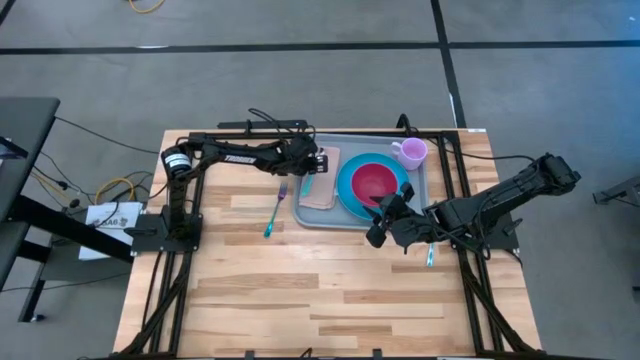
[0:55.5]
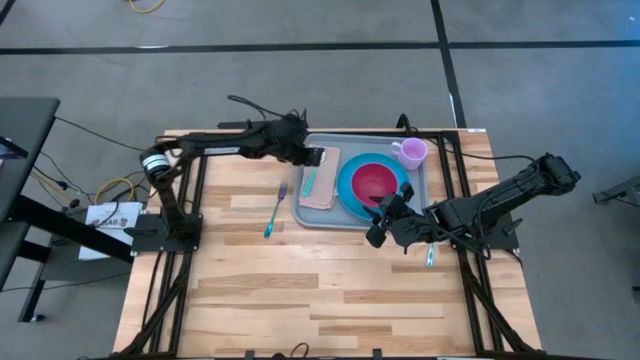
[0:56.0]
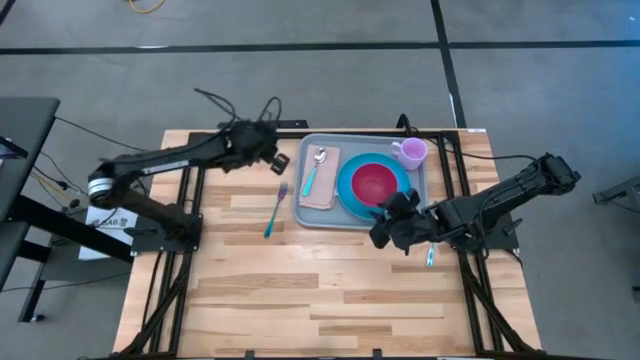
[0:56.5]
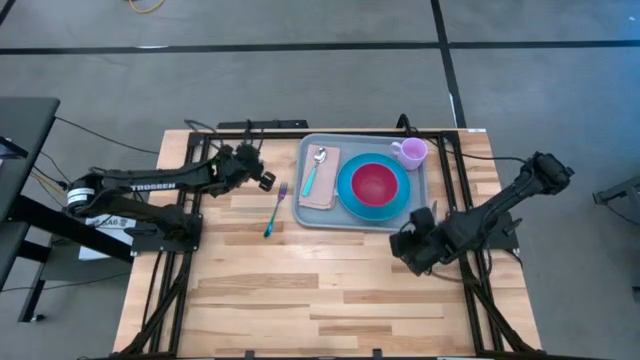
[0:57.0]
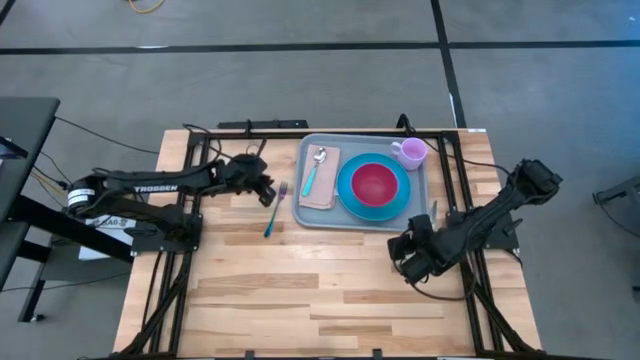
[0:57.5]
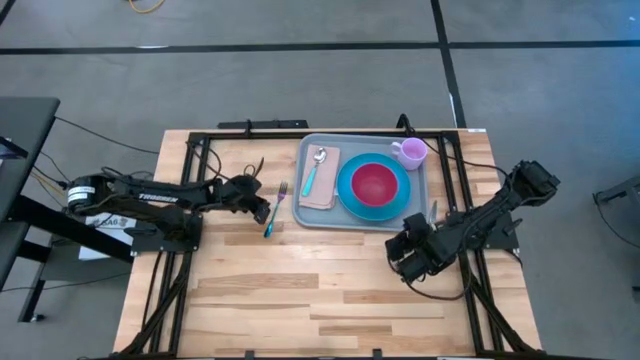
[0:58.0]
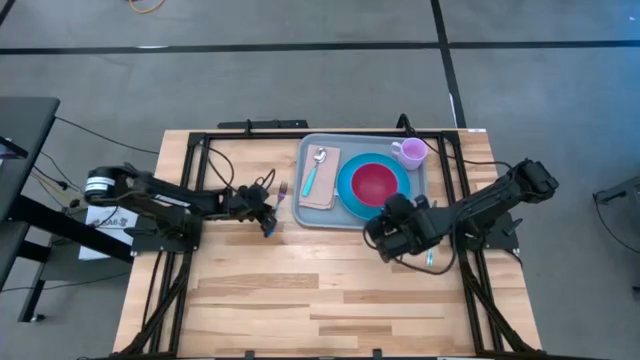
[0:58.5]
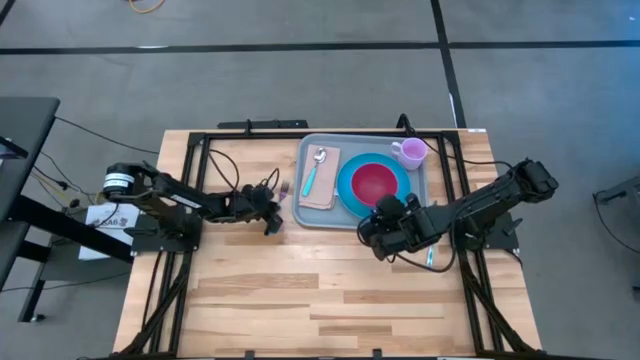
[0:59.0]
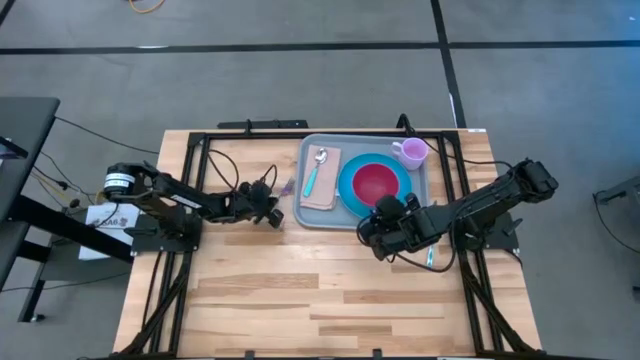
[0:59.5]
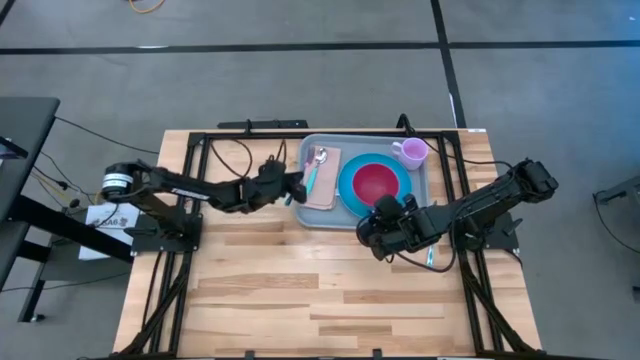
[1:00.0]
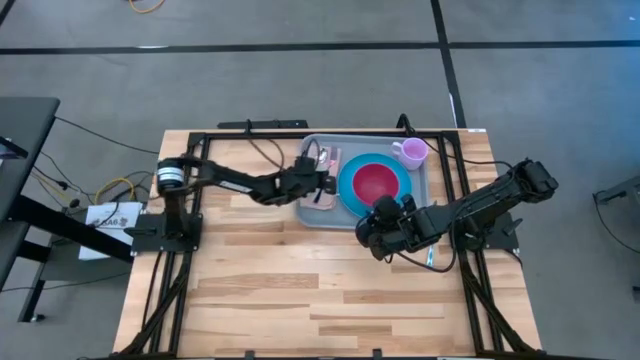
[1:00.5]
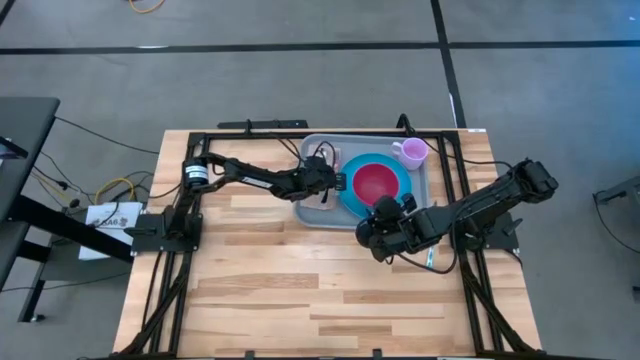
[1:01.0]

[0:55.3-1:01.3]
Task: Set up tray
Put the blue fork on the brown napkin to the right of the light blue spoon

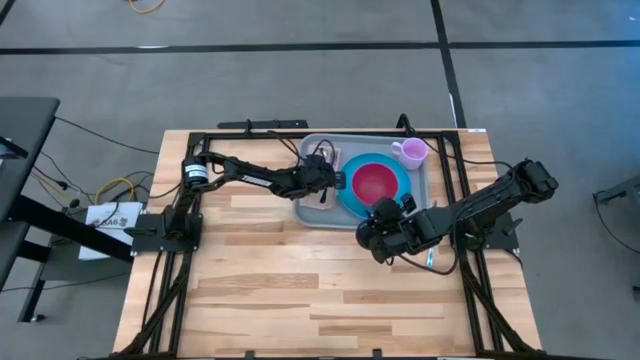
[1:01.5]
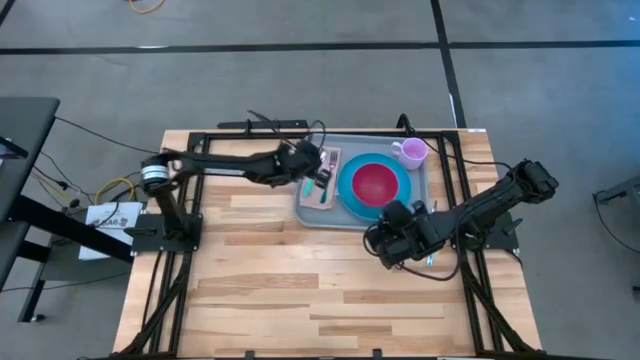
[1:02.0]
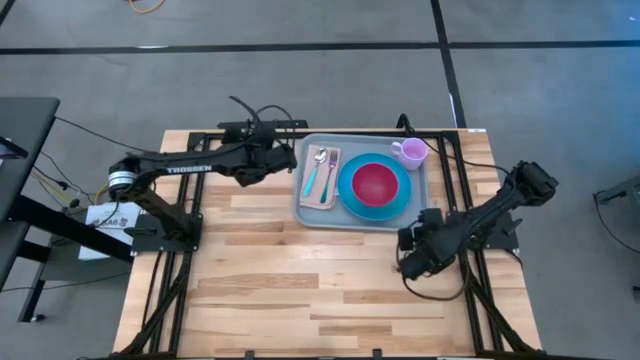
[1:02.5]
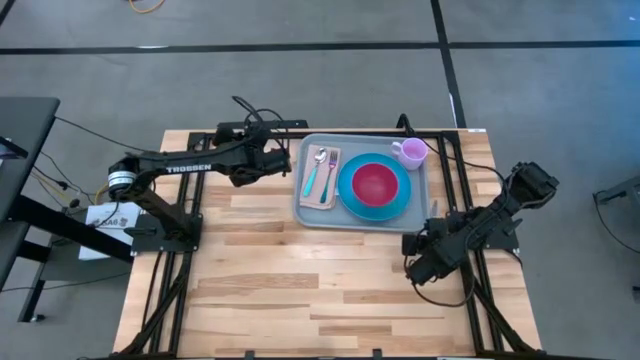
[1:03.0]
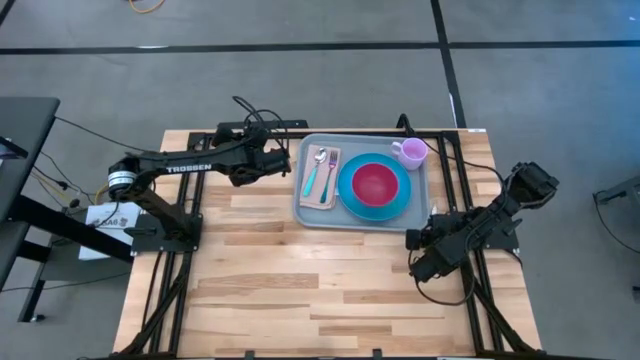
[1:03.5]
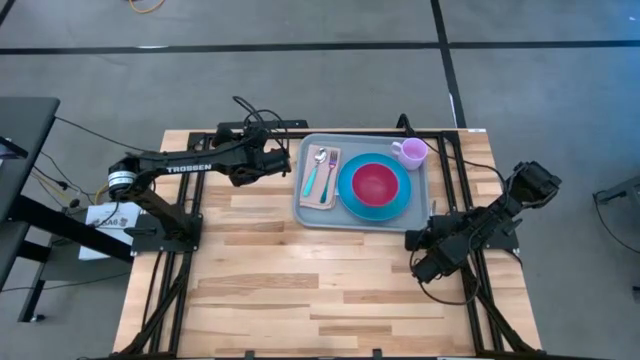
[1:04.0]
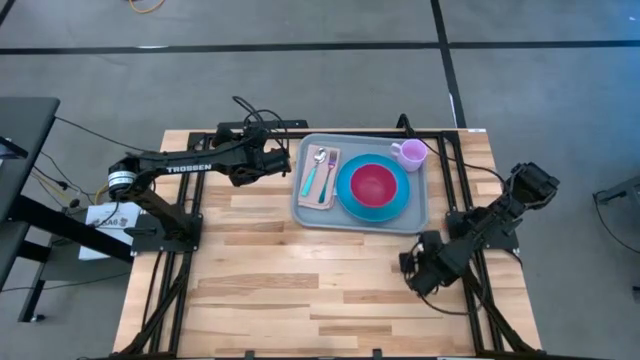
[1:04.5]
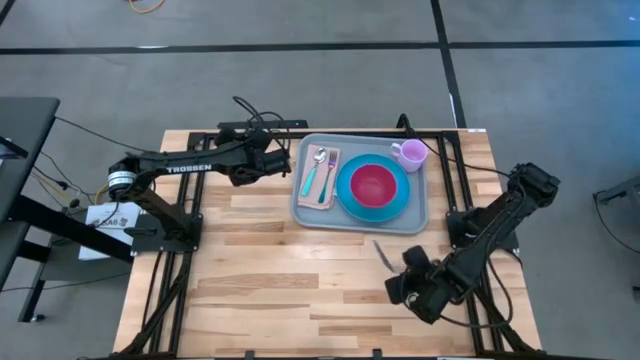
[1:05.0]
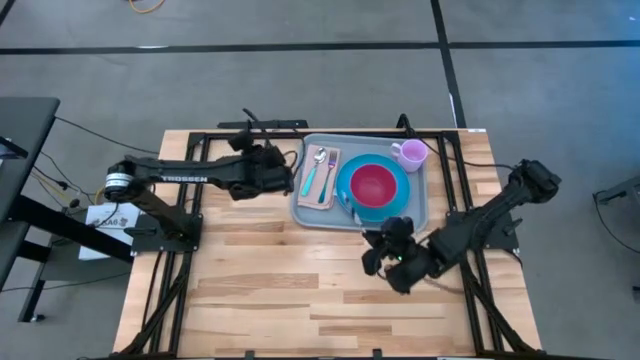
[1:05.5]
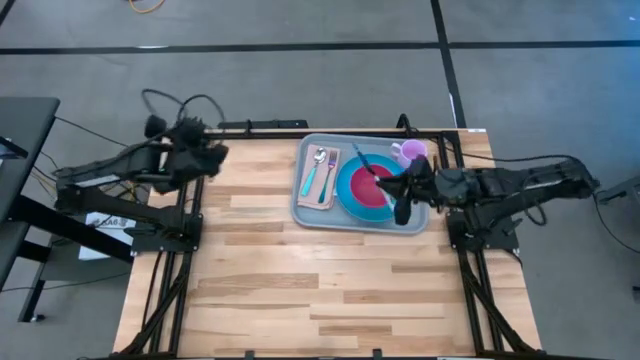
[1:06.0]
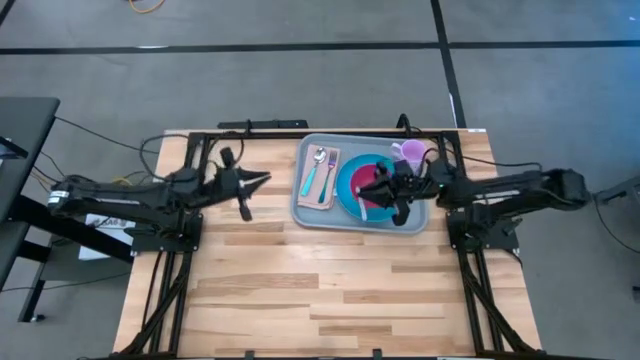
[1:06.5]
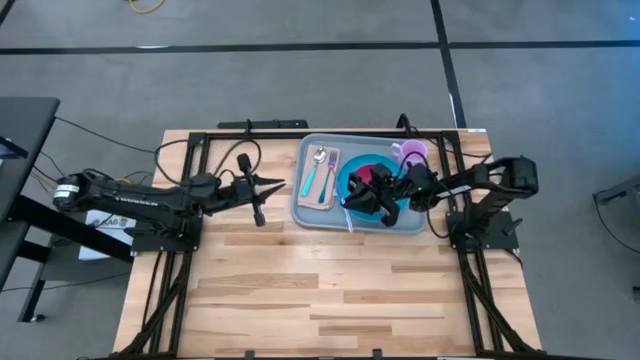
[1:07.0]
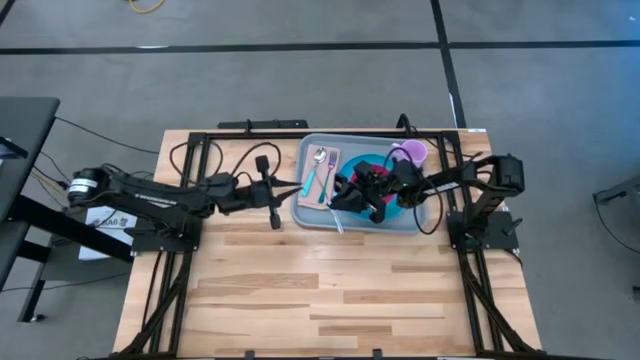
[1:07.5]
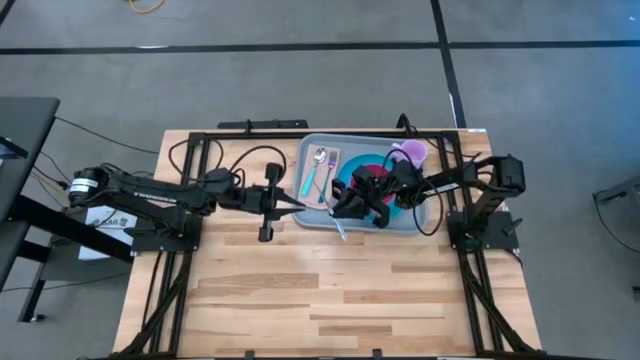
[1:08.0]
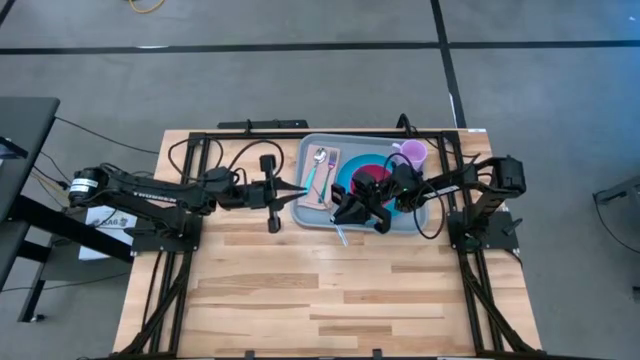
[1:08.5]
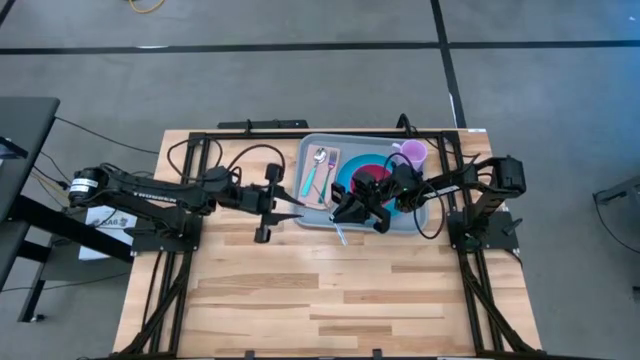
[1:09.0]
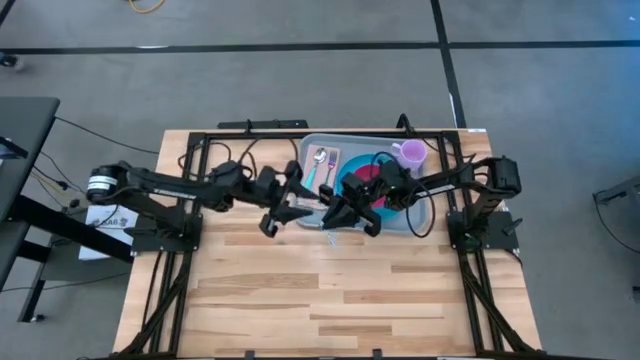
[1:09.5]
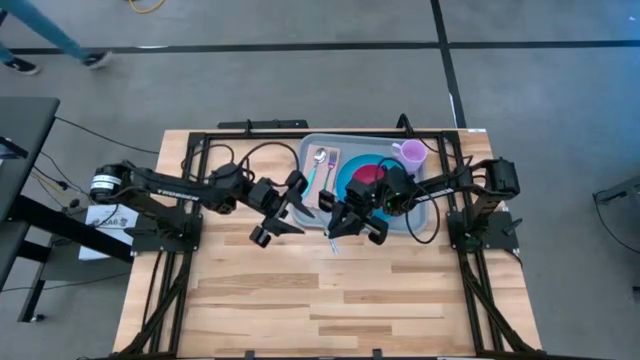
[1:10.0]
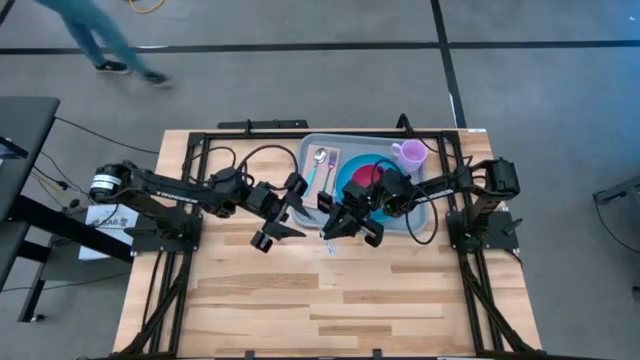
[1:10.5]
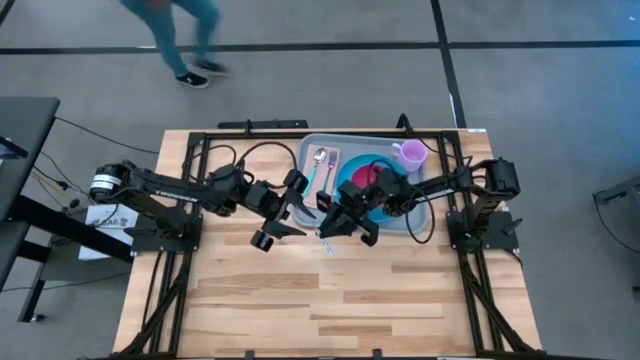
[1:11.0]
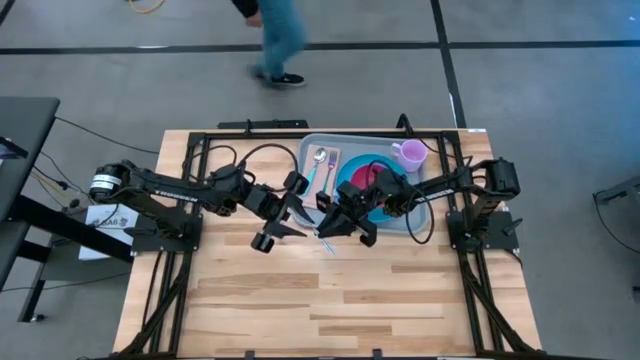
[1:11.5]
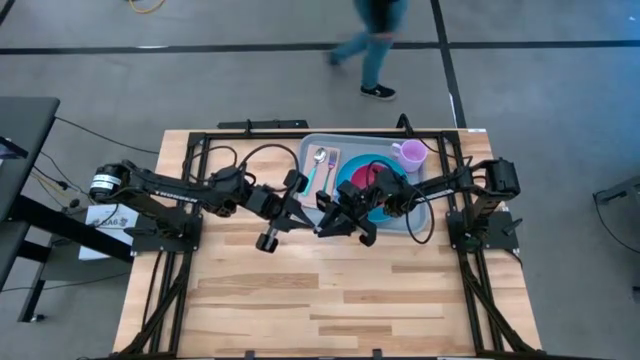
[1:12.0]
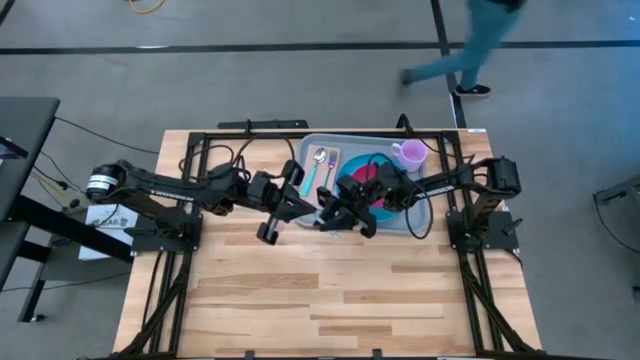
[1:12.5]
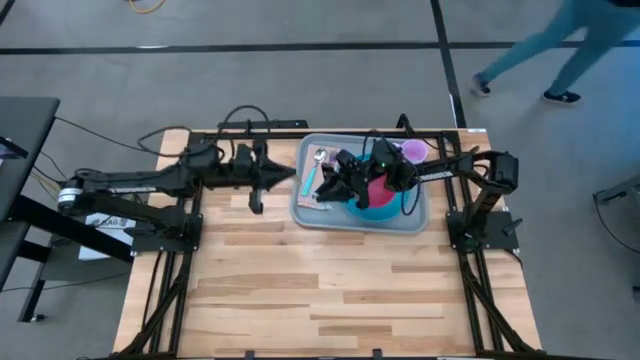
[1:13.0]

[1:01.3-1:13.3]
Put the white patterned knife on the brown napkin to the left of the blue fork

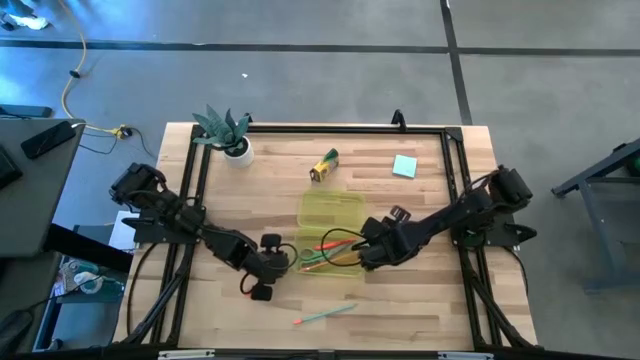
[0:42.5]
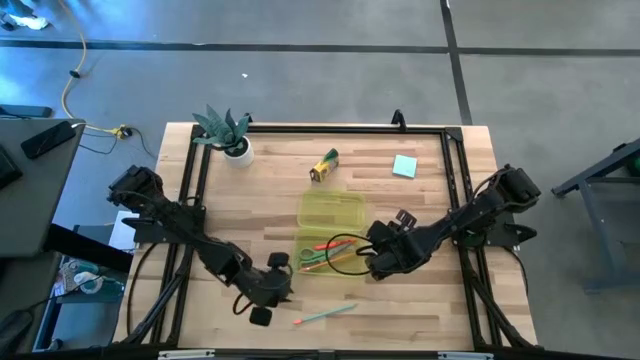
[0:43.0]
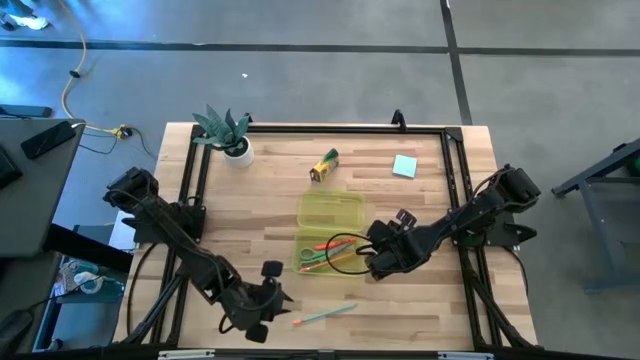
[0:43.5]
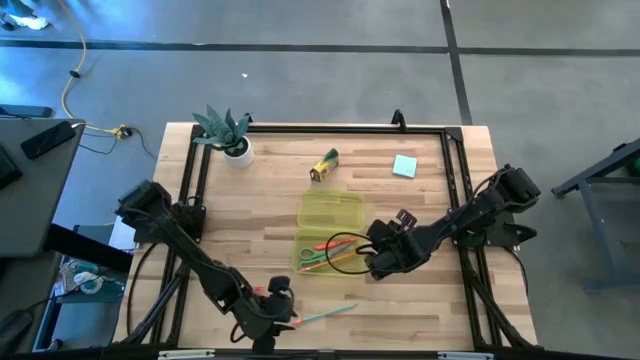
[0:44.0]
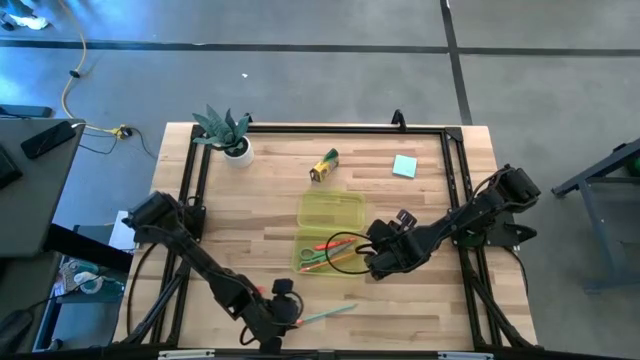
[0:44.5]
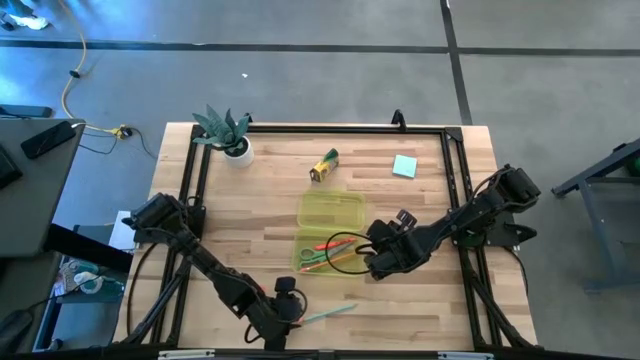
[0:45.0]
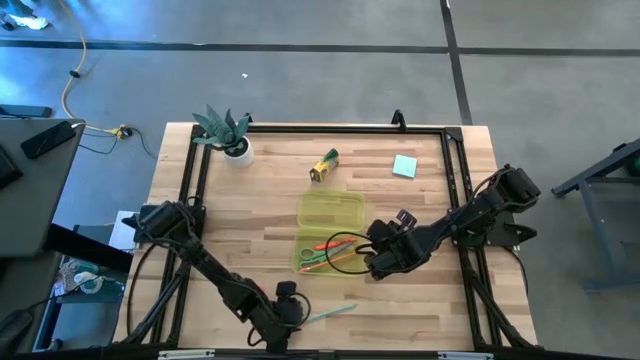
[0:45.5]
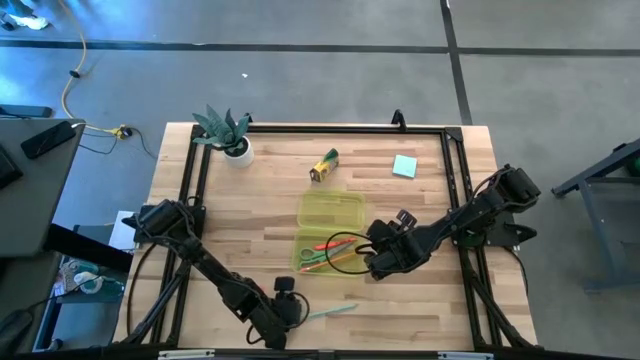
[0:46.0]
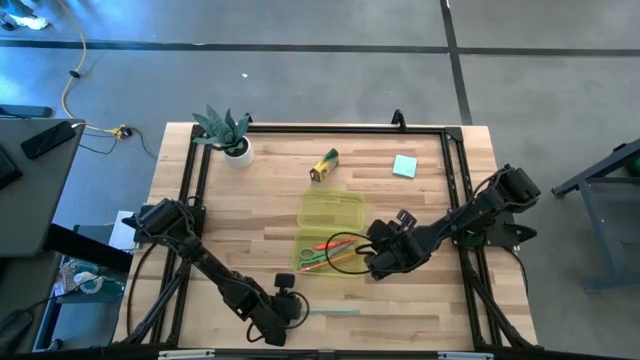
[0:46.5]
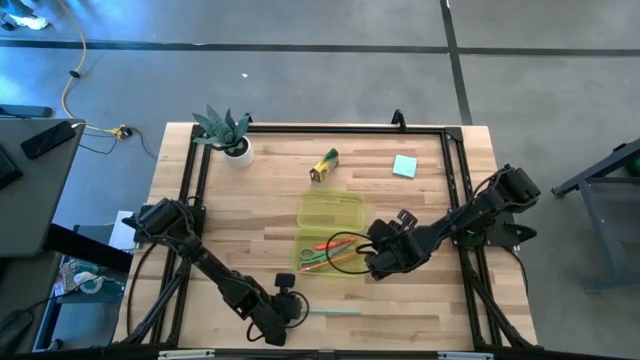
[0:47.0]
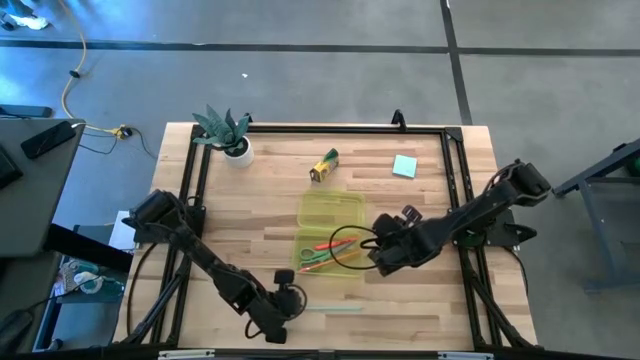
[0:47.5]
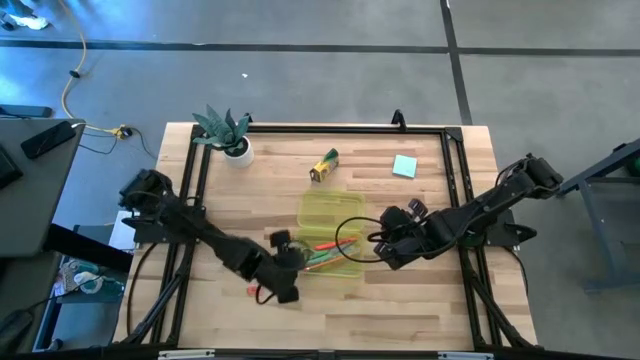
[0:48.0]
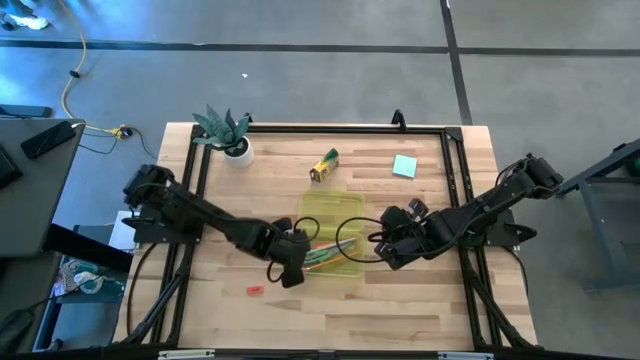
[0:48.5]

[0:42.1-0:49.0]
Task: Pack school essentials
Put the light blue pencil into the yellow box
